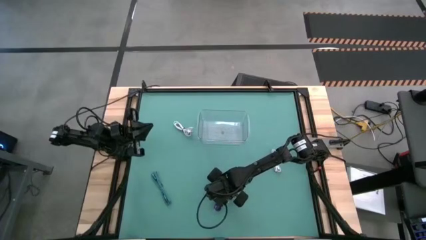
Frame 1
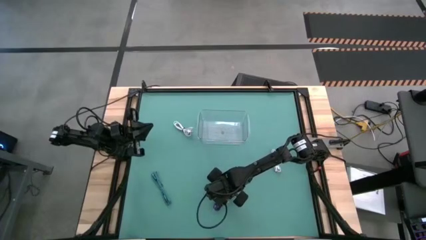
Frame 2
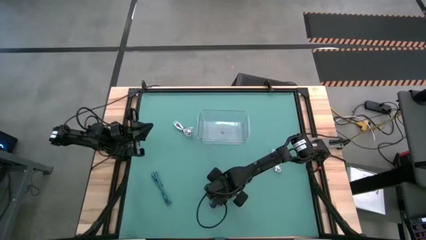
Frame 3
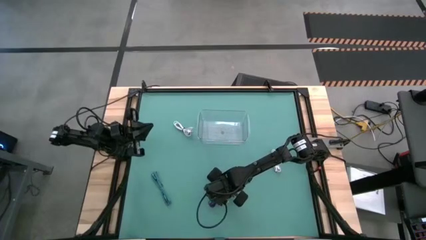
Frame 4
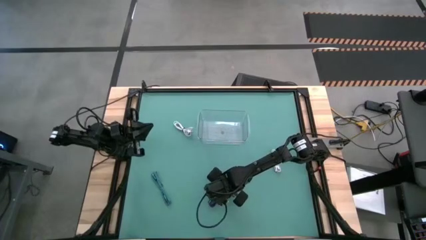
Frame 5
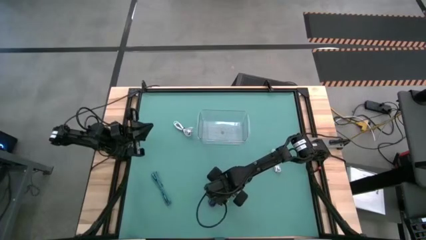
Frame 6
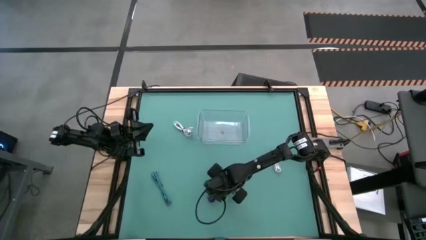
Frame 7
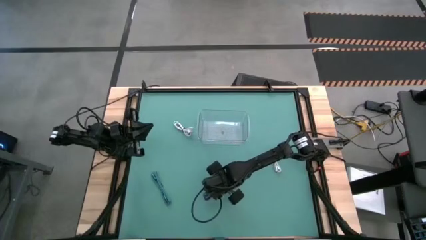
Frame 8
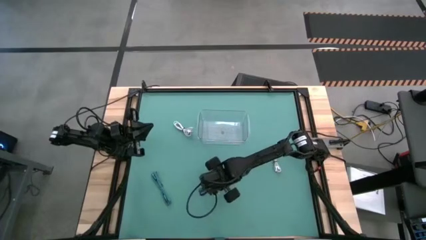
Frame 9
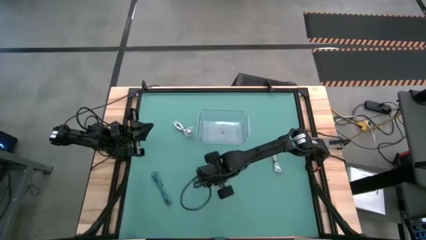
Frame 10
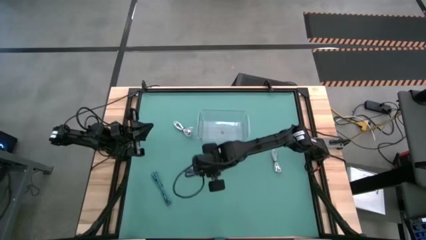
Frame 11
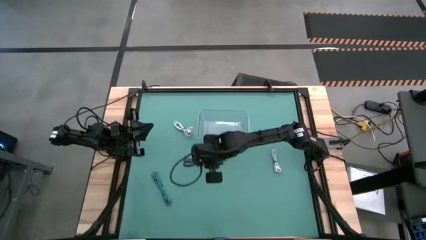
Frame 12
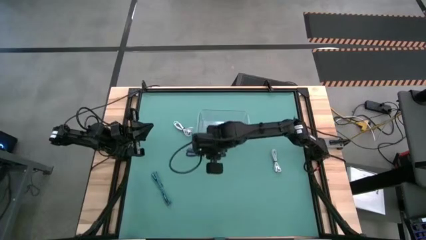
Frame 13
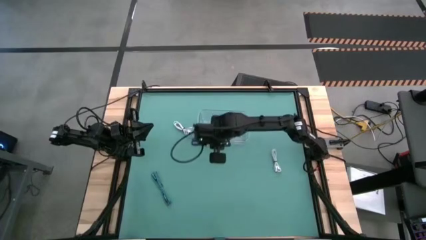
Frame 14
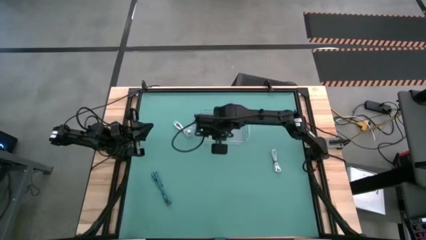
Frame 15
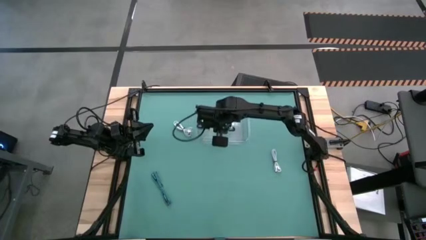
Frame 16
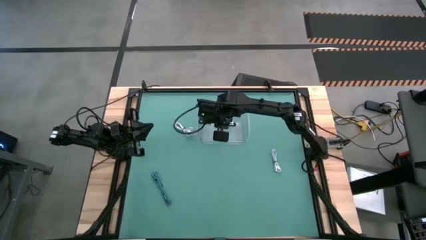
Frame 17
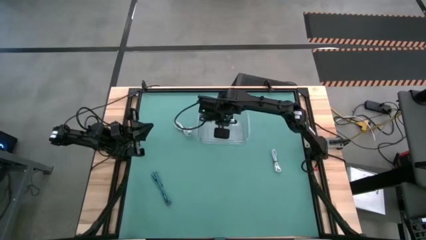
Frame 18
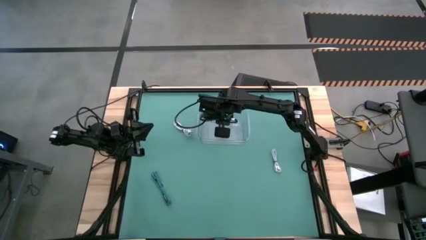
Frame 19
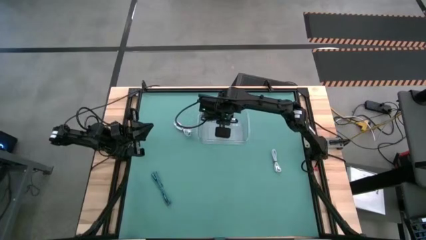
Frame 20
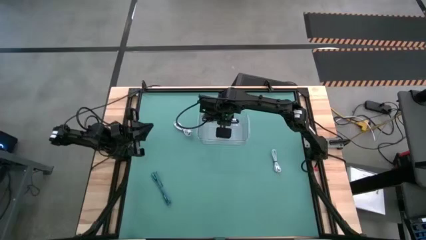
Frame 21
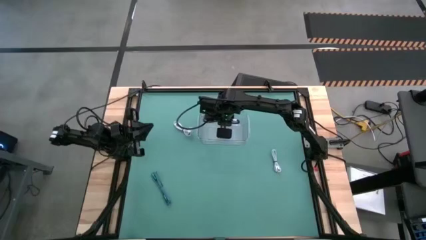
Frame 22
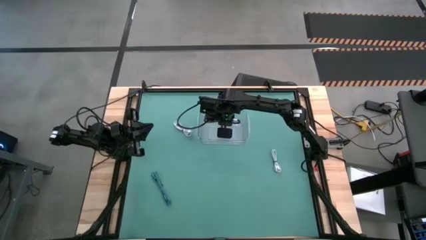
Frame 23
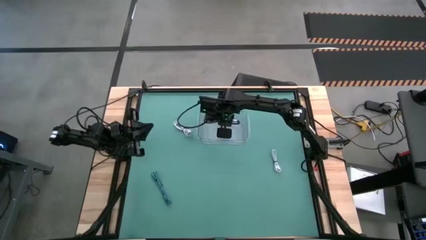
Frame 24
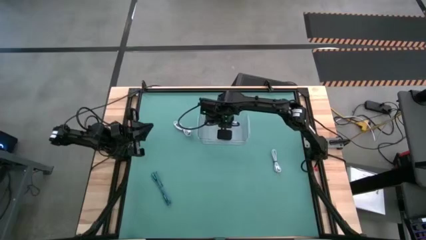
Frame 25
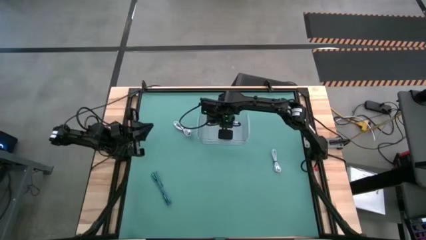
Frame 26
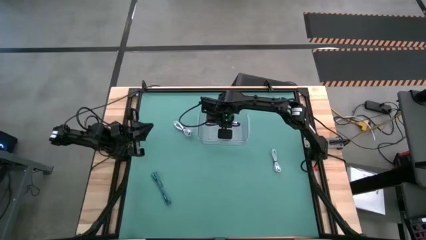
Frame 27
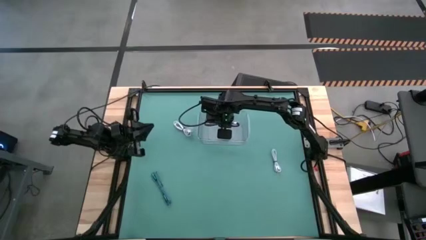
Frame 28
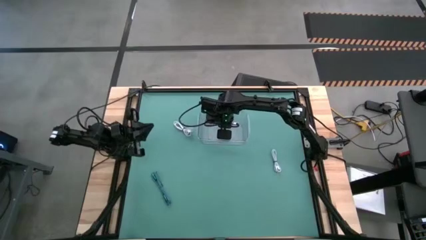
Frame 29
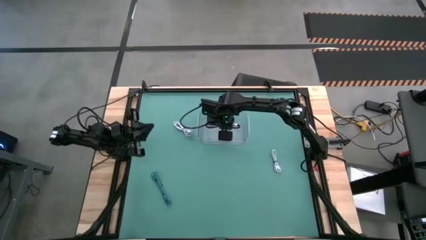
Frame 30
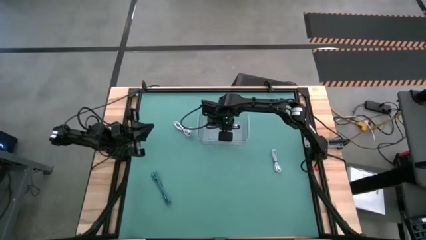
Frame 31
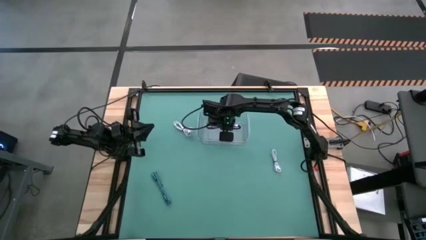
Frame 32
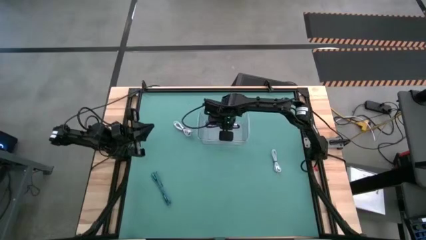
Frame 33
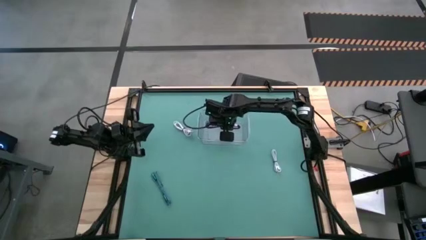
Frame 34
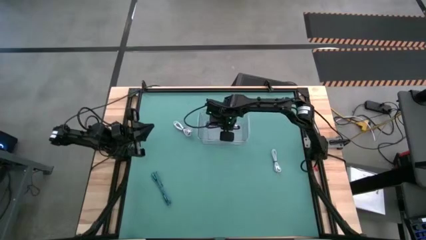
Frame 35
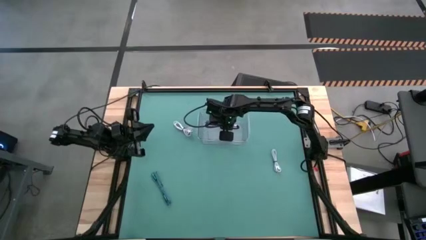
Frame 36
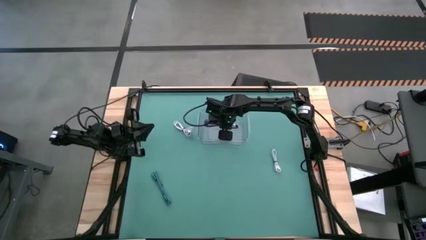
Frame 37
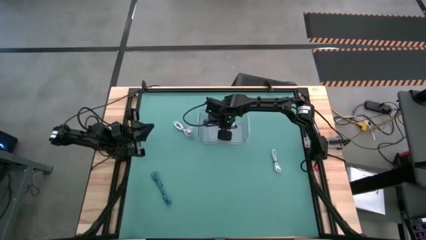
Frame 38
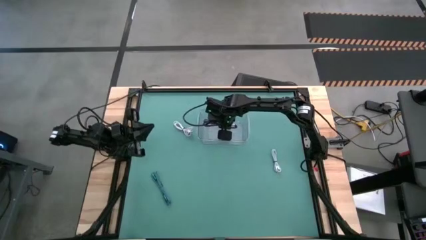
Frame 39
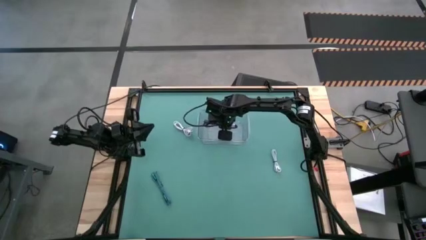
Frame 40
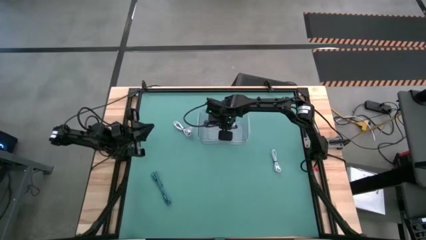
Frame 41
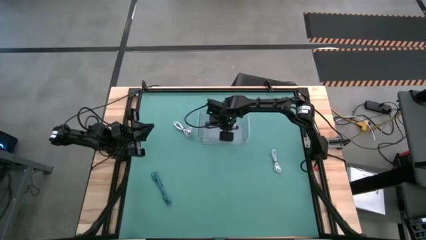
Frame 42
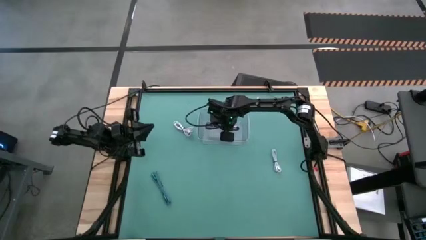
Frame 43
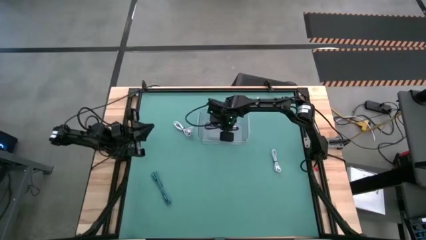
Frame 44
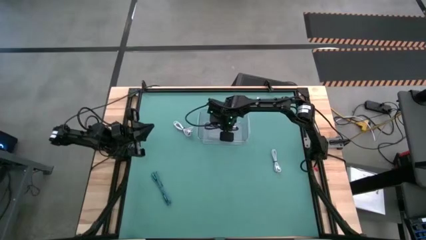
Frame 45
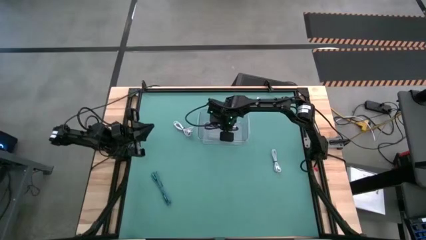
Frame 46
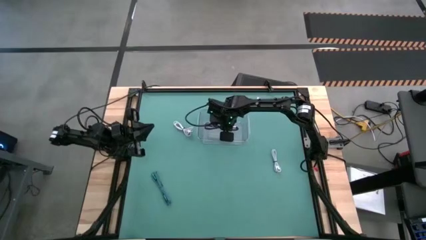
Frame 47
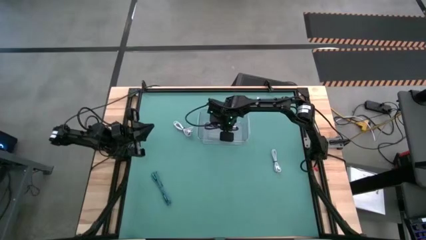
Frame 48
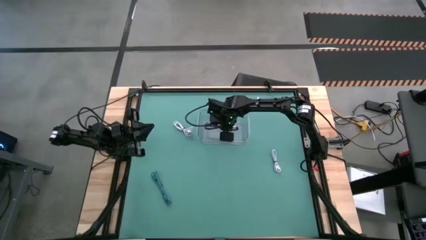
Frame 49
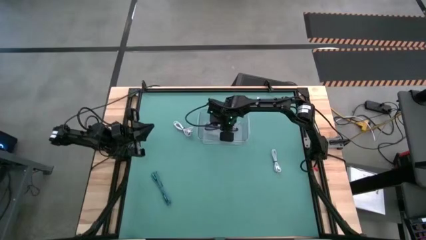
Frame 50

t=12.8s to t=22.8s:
Task: Pick and place USB-C Cables
Put the purple charger cable into the transparent container

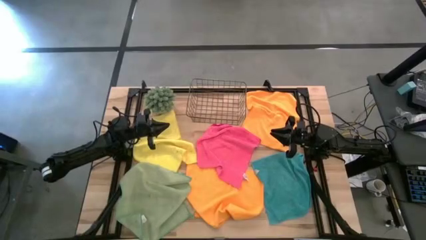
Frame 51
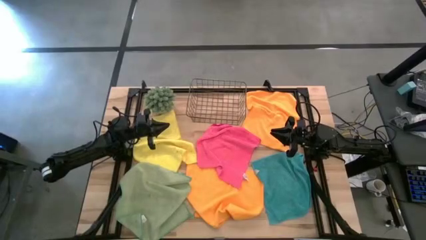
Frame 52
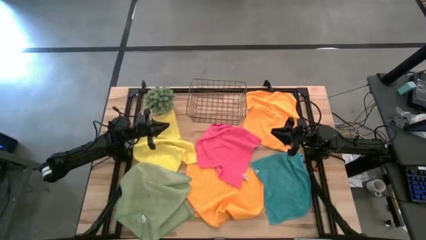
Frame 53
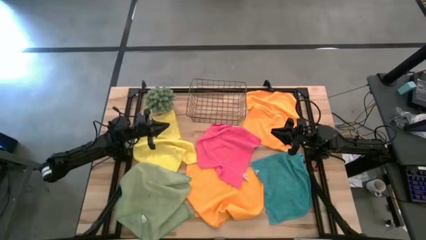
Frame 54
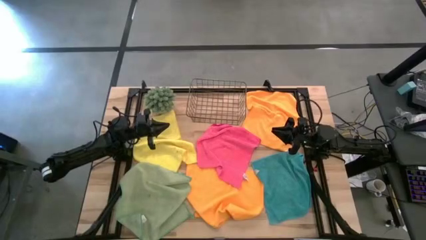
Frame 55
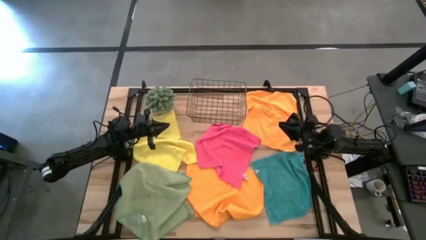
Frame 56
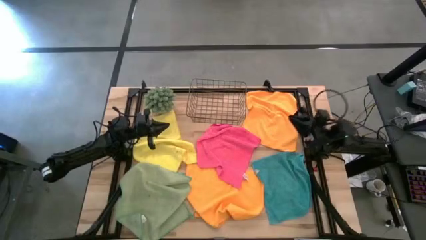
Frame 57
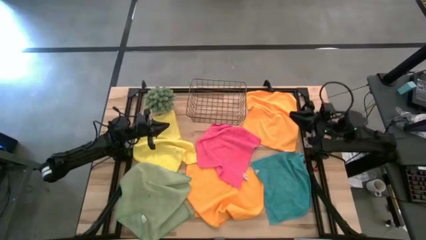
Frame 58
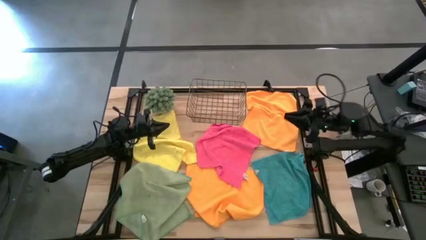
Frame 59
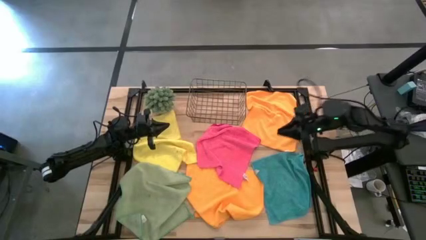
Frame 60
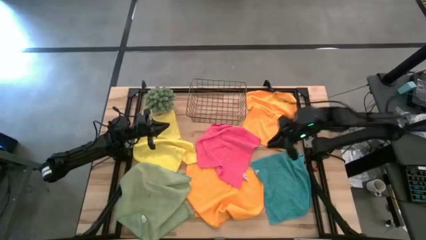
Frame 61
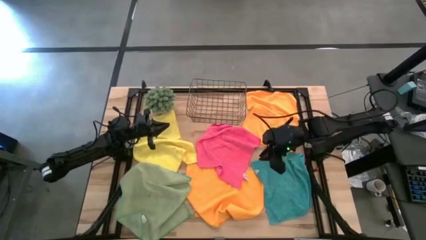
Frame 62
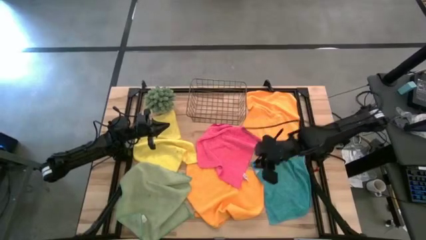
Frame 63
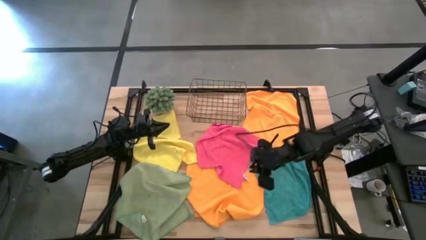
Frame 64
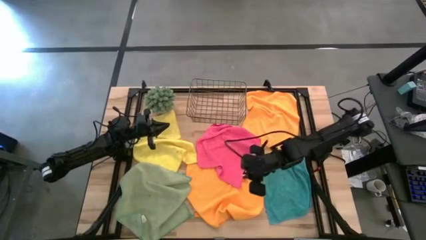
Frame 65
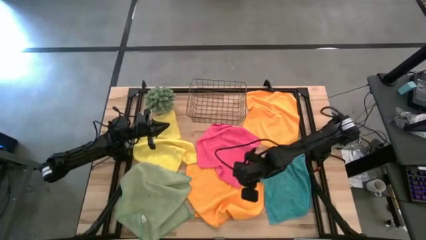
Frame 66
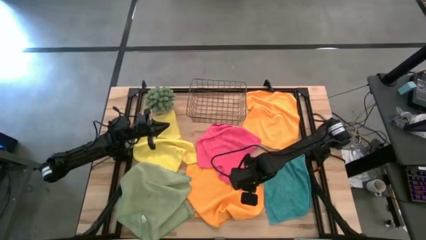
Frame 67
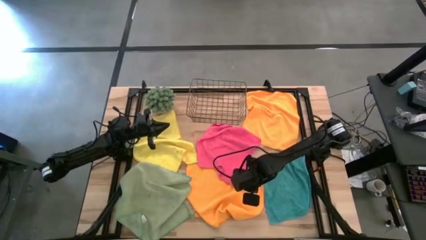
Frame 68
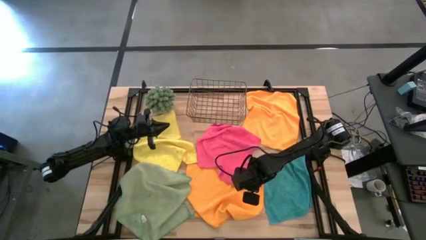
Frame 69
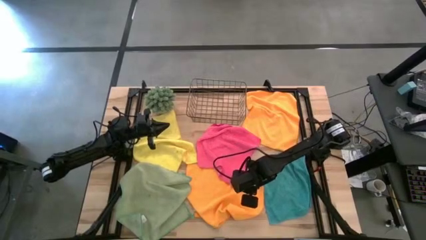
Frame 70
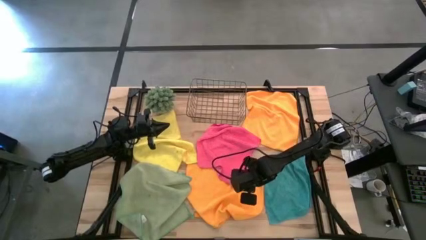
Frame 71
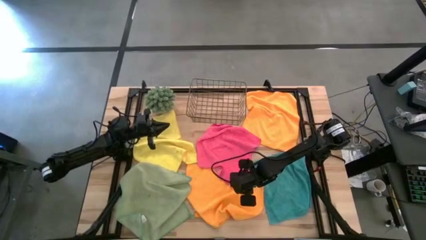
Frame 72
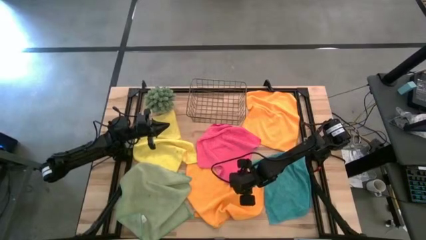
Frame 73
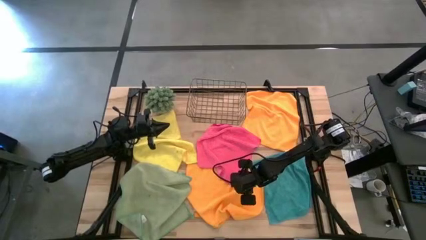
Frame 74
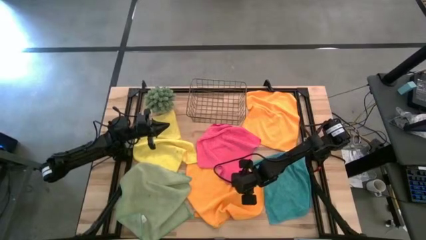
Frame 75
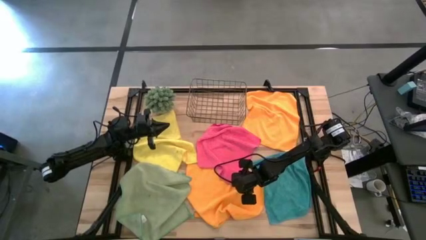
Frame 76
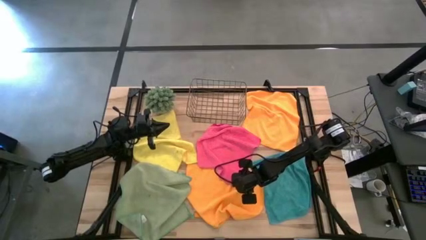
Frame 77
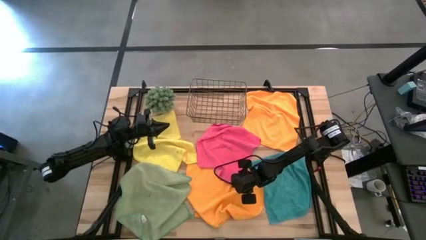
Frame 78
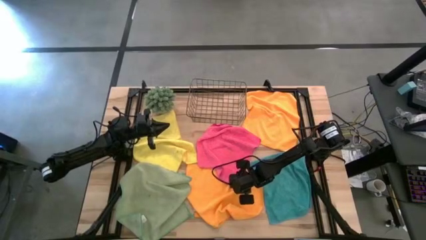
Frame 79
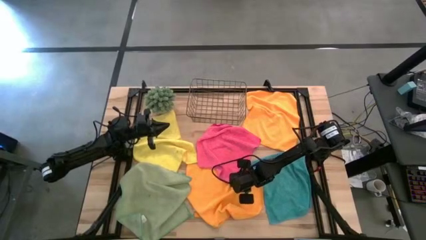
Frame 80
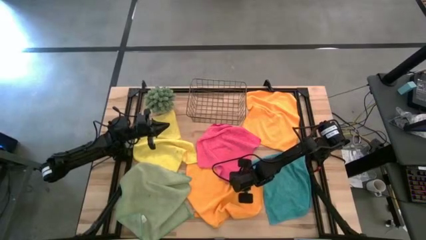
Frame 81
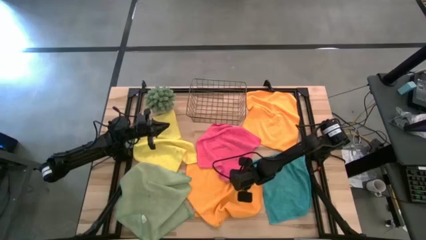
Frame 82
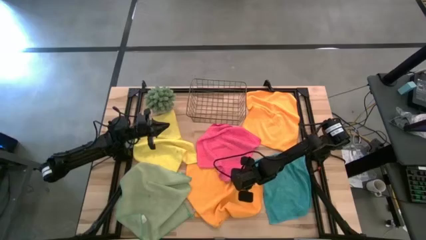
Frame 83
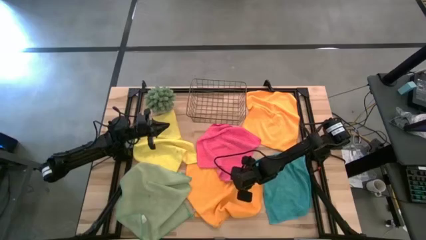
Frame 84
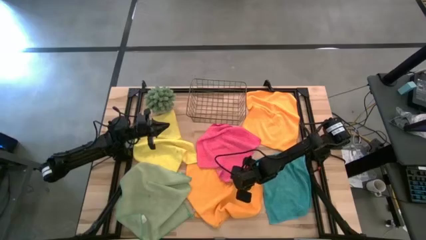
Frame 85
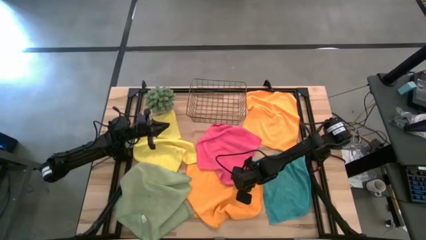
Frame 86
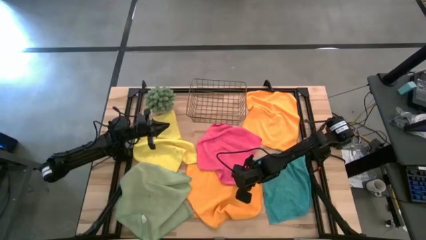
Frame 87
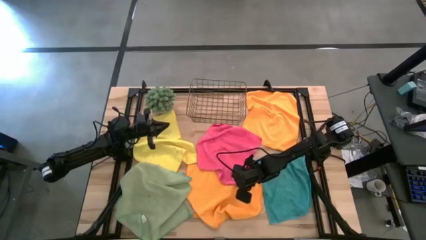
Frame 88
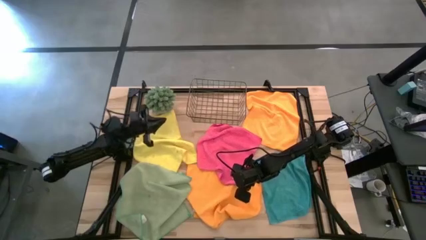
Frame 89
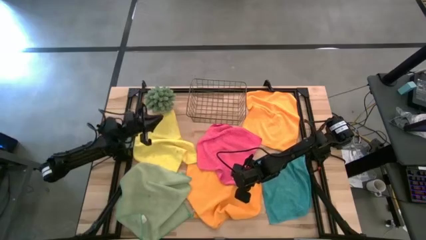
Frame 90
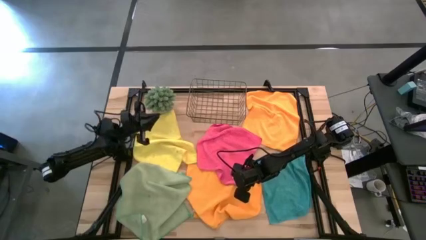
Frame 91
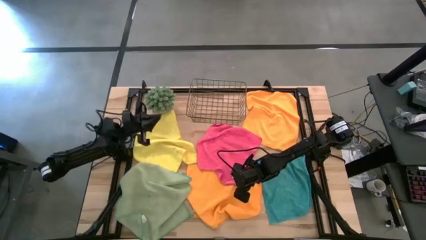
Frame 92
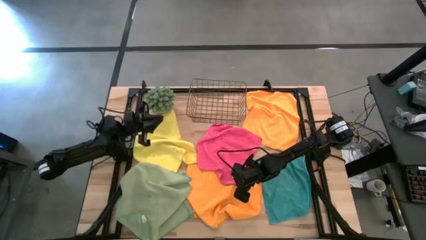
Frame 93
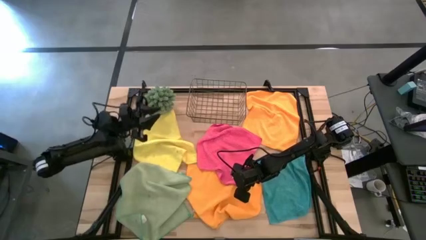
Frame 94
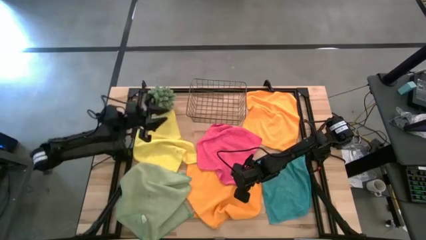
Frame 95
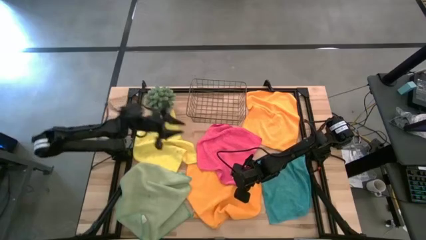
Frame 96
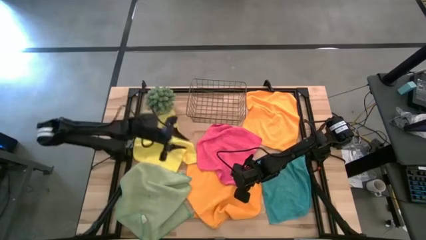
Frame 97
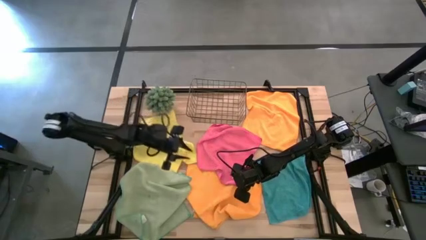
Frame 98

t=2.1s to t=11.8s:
Task: Fold microfiber towels
Fold the pink microfiber towel
